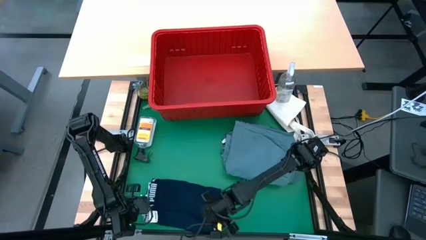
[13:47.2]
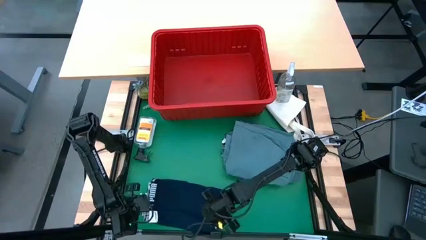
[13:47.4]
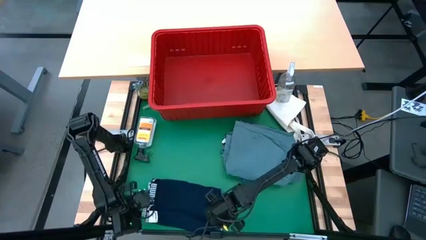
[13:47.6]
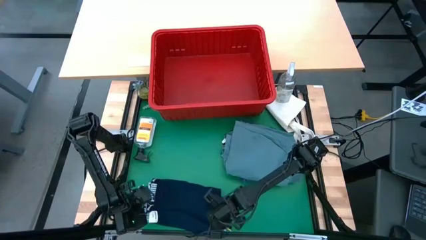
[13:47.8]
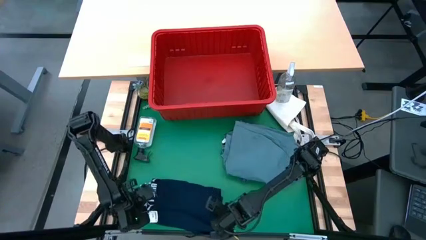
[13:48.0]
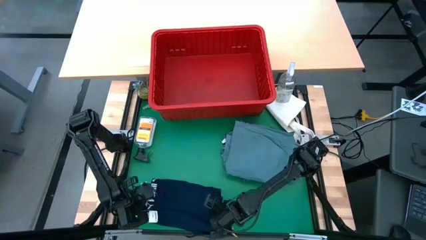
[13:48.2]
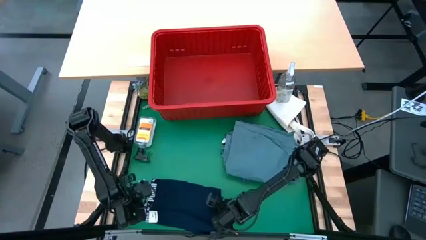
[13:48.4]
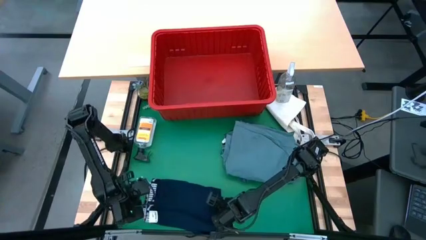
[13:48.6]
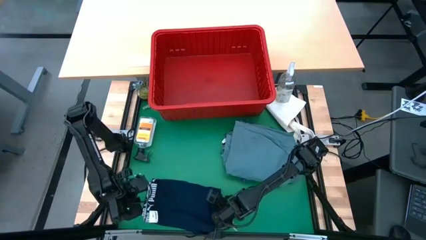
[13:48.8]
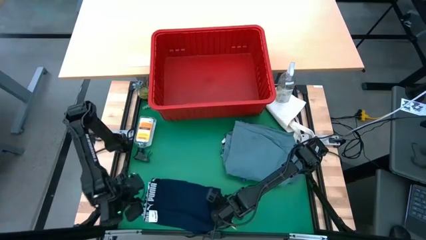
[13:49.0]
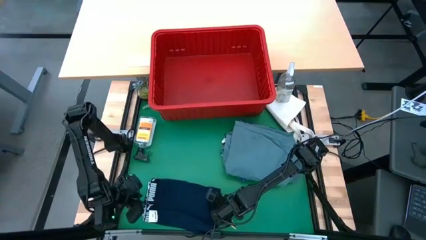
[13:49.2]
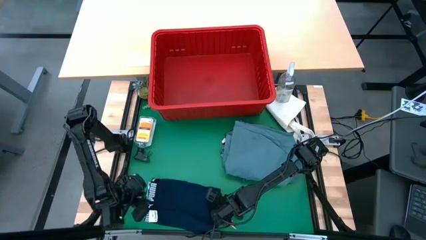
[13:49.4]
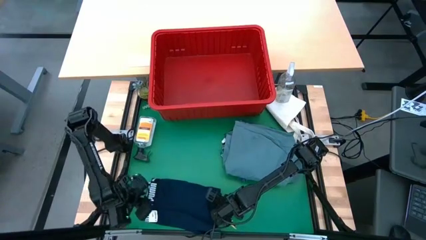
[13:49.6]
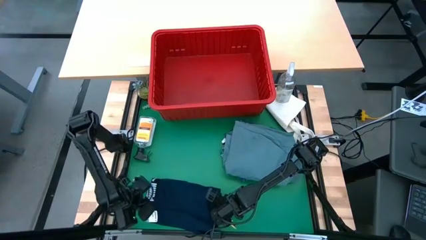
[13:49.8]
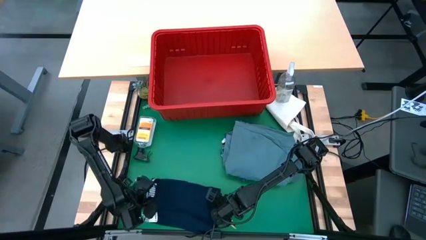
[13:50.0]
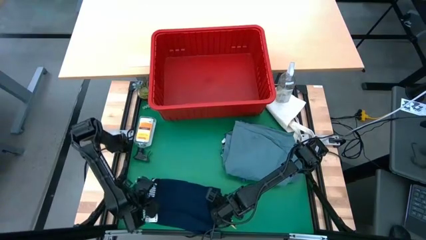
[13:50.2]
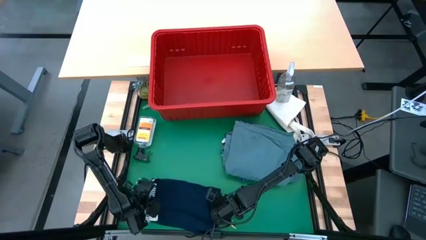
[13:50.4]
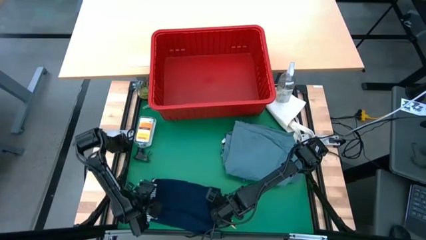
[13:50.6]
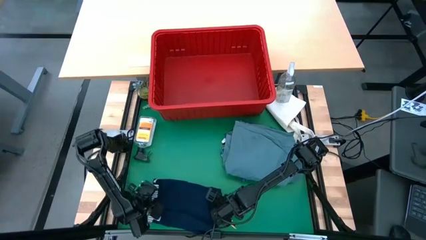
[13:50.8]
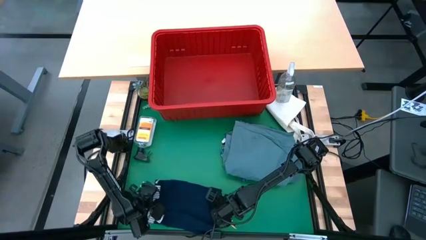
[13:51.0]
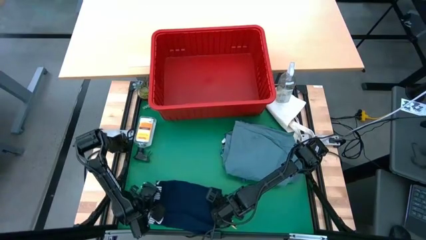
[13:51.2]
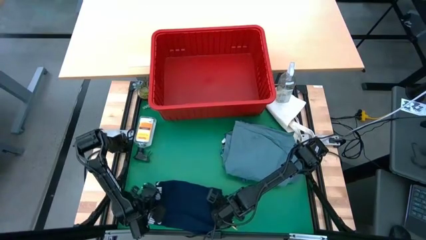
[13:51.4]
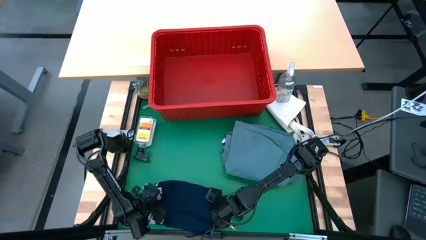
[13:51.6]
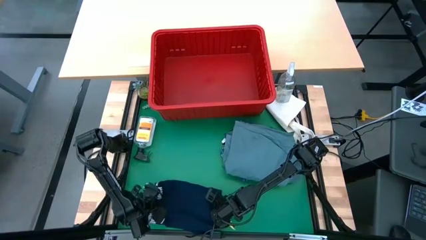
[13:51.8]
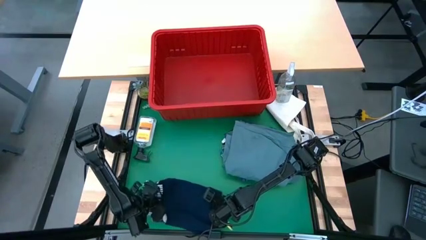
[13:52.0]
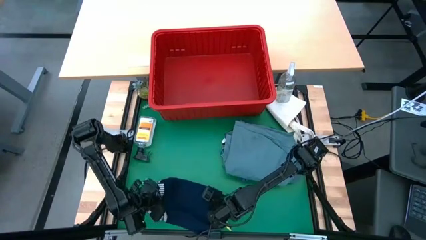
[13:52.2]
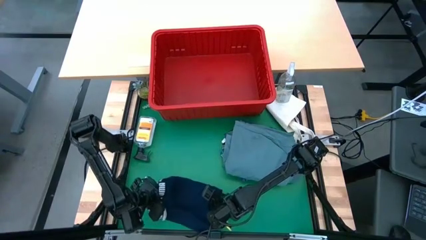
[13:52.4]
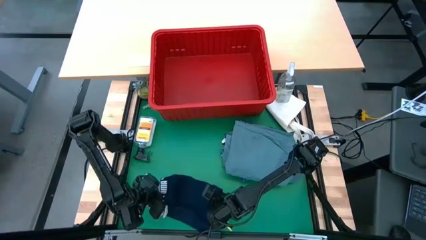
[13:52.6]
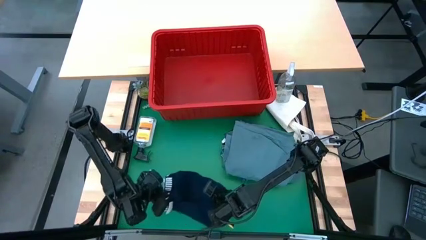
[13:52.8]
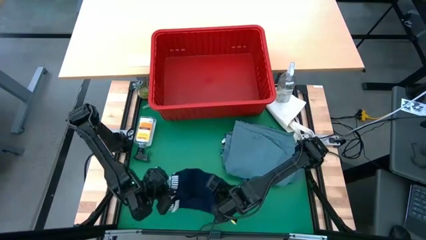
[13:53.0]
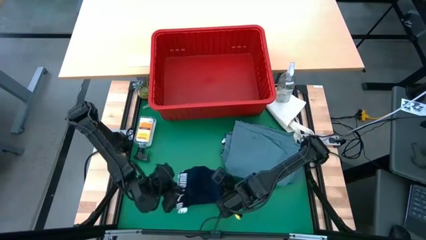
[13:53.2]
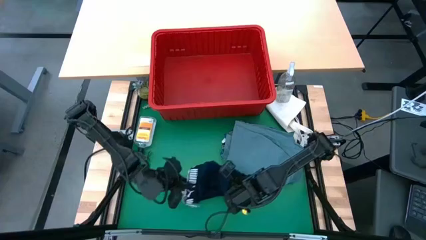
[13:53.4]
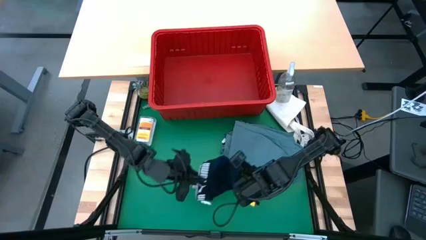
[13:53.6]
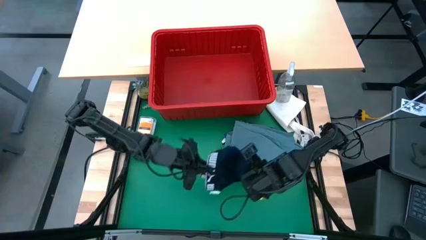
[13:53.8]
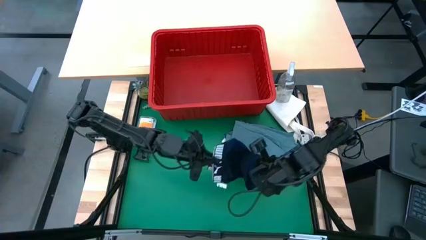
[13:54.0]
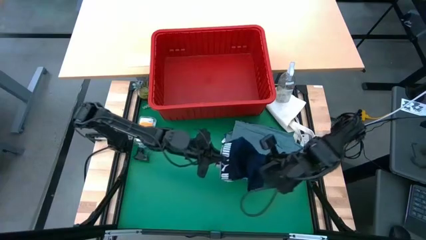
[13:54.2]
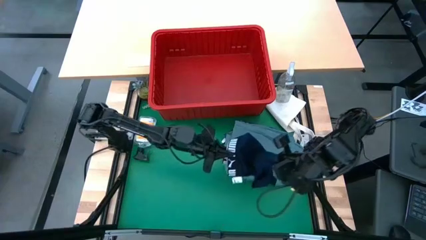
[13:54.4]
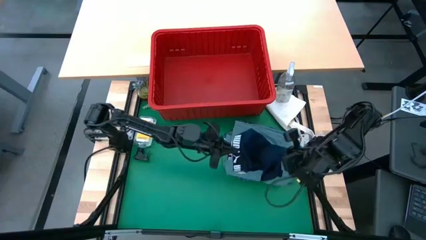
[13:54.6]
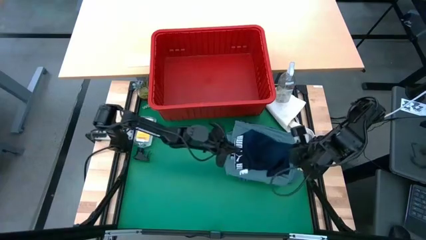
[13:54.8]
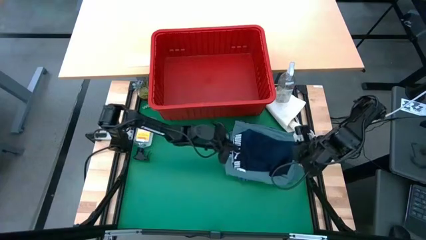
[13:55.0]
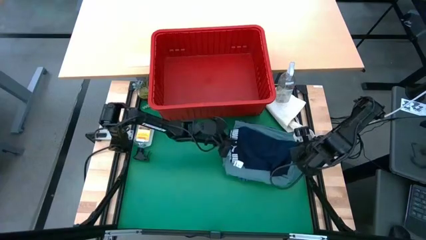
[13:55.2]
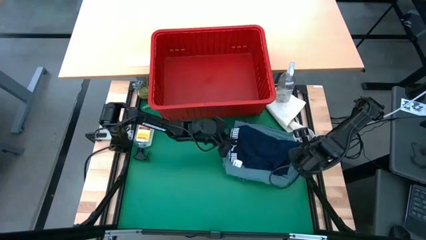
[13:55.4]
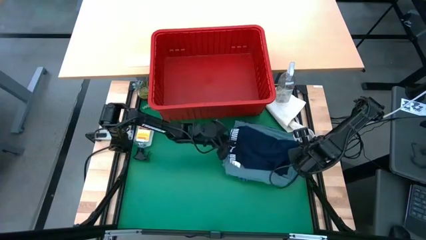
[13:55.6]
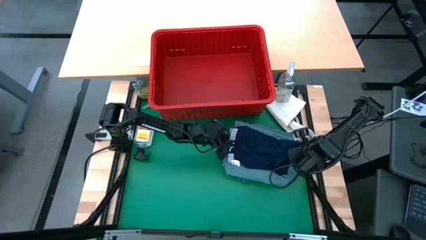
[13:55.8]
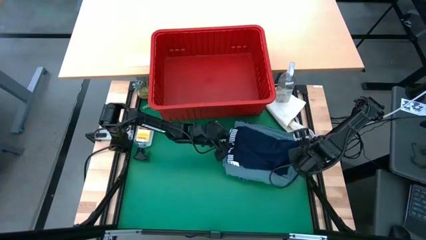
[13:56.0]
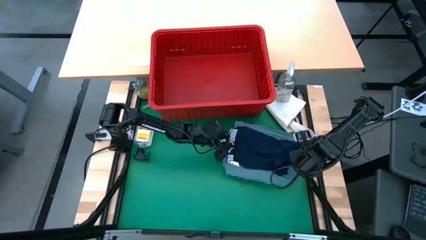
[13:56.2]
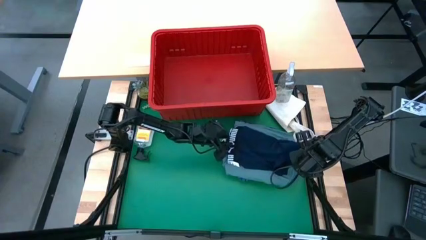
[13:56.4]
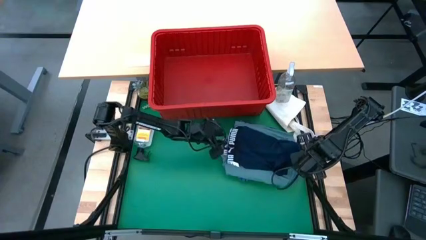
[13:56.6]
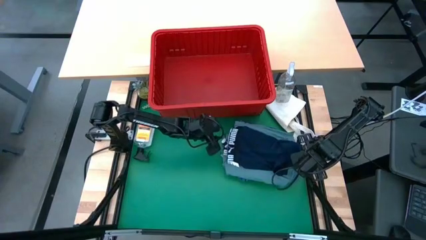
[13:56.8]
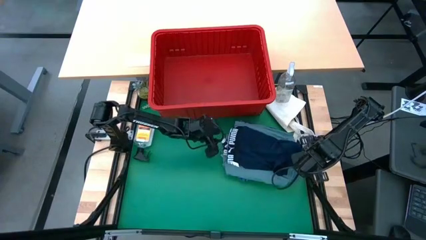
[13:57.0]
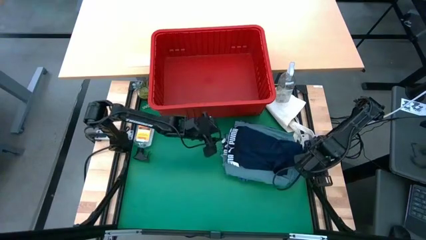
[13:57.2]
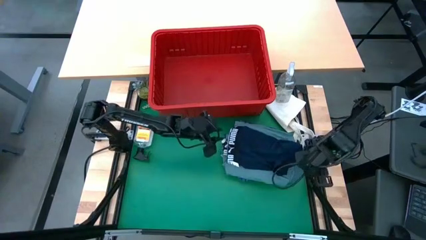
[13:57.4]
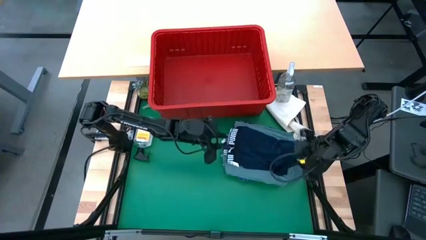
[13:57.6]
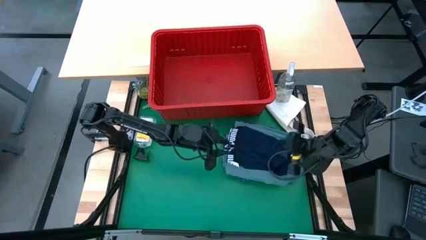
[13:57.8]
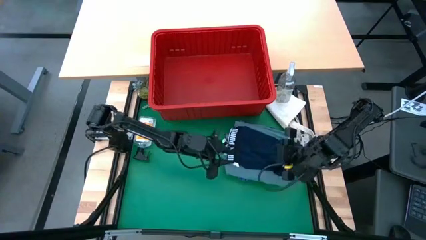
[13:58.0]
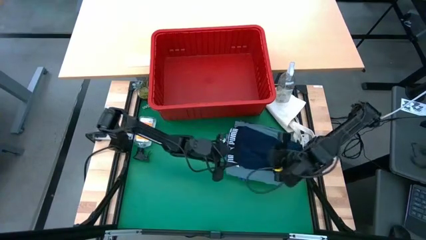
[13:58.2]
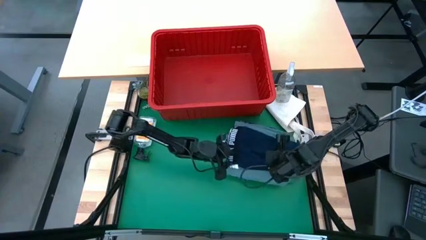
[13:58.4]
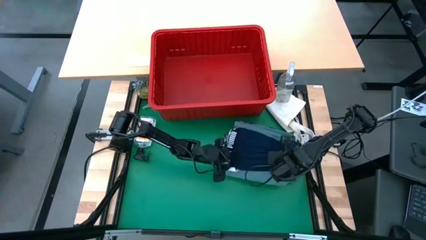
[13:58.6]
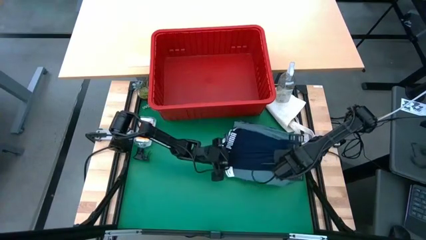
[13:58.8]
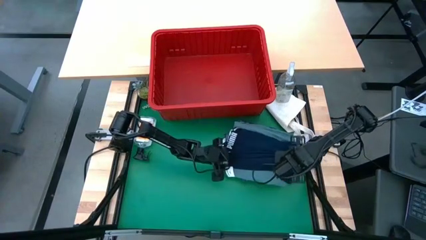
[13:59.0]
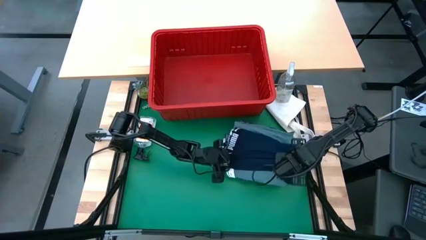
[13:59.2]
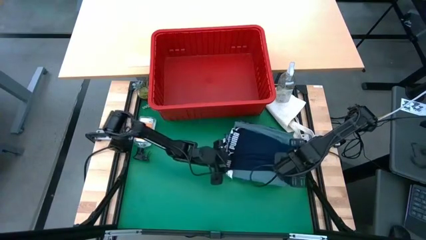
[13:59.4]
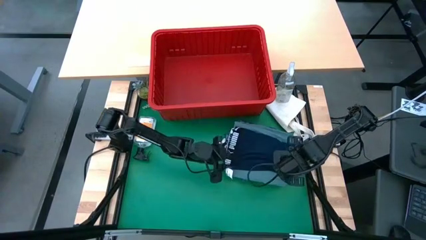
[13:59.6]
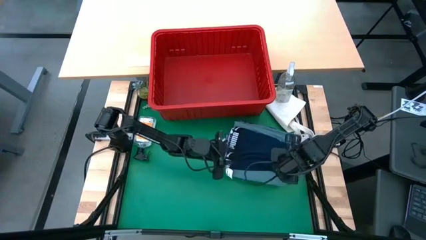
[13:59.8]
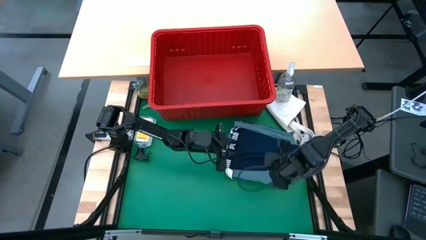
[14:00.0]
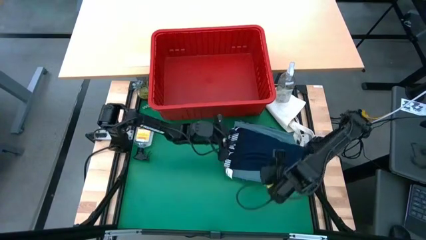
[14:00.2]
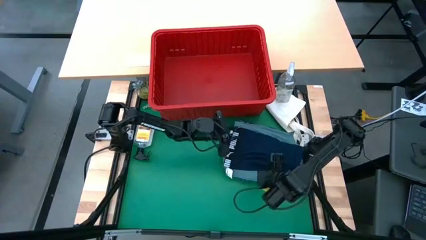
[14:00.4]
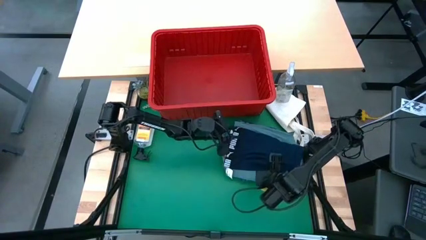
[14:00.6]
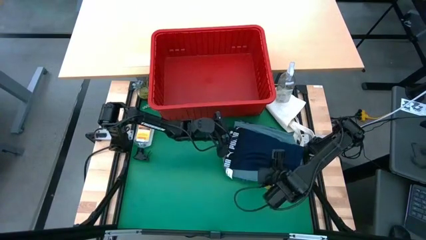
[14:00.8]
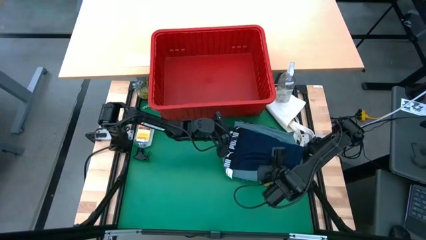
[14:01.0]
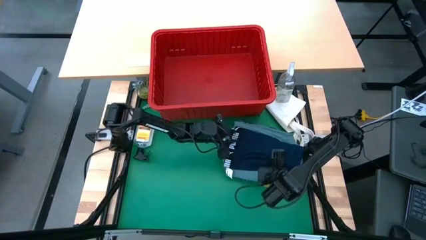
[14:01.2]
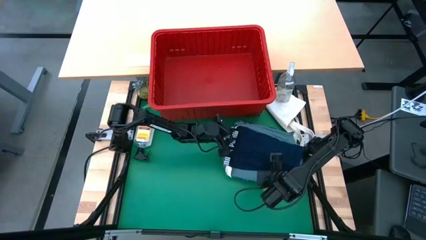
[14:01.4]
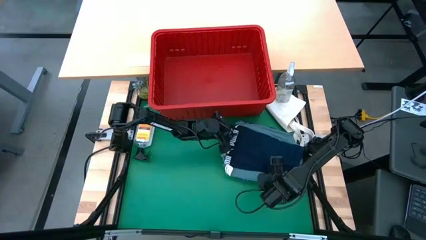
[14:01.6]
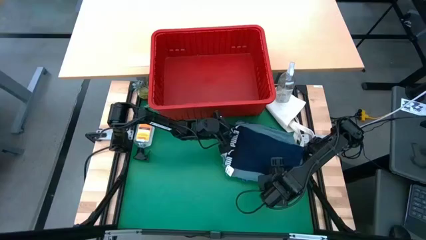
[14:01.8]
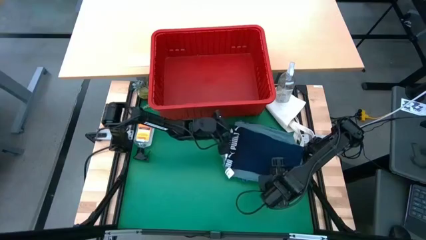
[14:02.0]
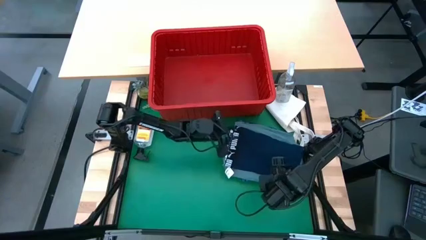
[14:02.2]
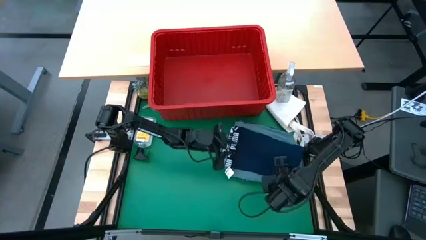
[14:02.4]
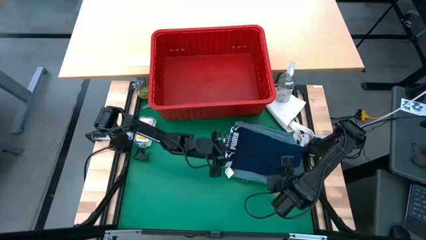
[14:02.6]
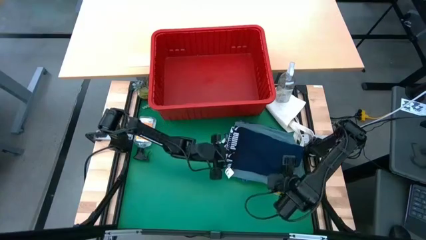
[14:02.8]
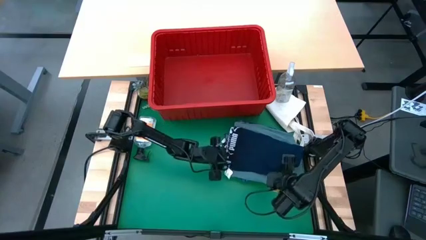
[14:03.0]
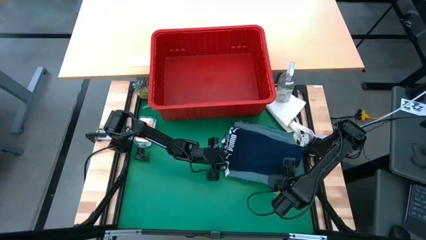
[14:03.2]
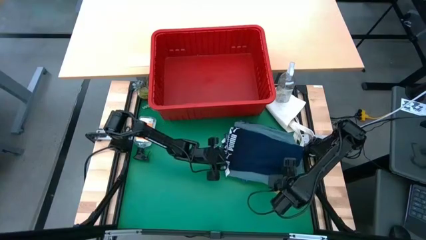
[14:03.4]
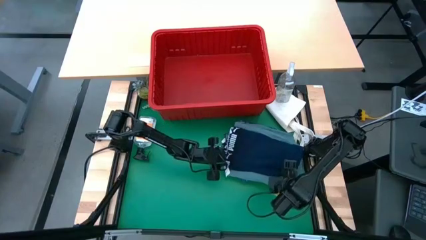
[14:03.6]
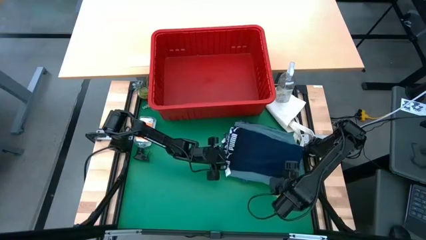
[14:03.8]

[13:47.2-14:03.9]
Task: Fold Laundry from Bin
Stack the dark blue underwear shorts on top of the blue pants
